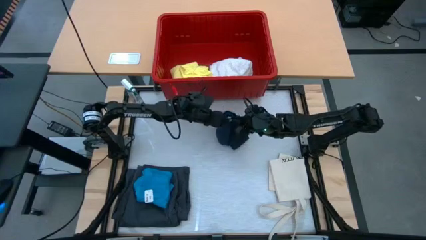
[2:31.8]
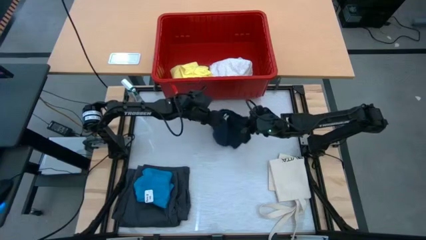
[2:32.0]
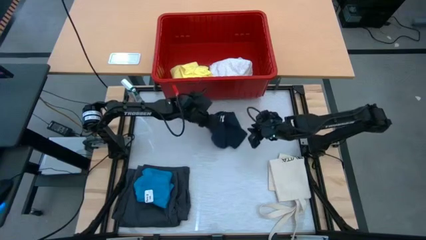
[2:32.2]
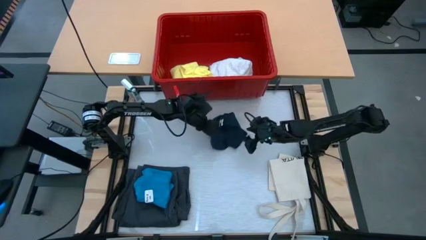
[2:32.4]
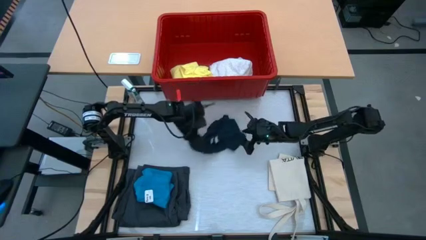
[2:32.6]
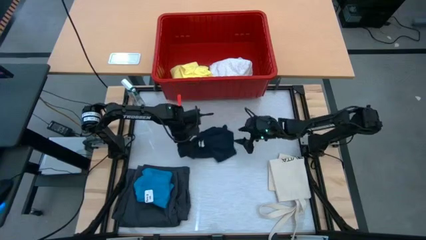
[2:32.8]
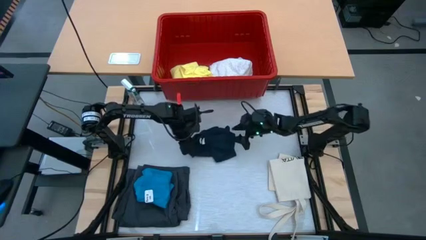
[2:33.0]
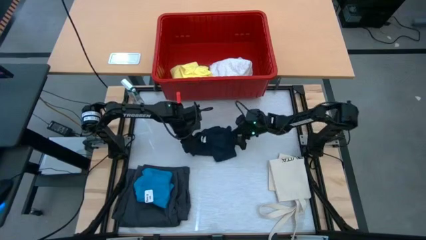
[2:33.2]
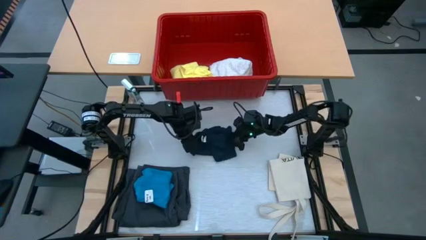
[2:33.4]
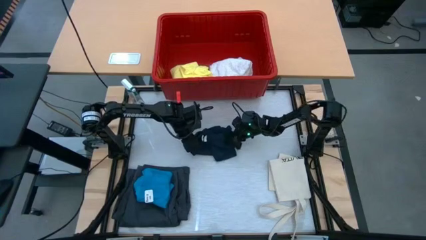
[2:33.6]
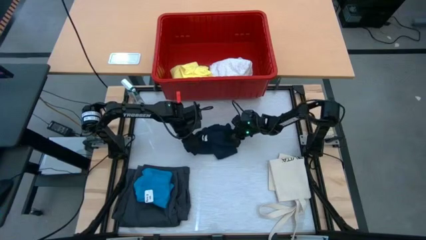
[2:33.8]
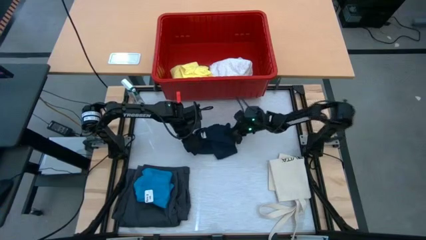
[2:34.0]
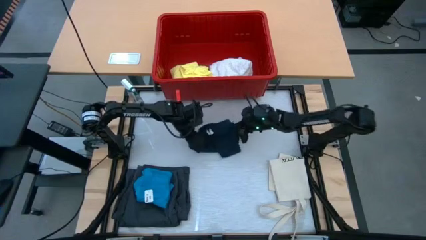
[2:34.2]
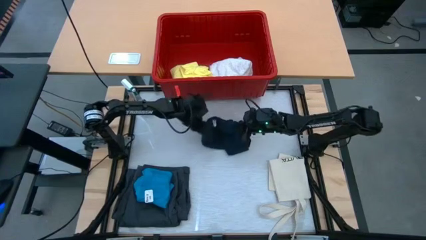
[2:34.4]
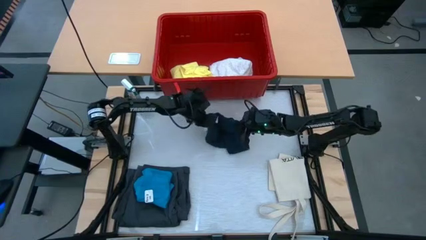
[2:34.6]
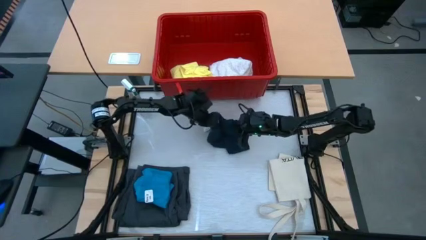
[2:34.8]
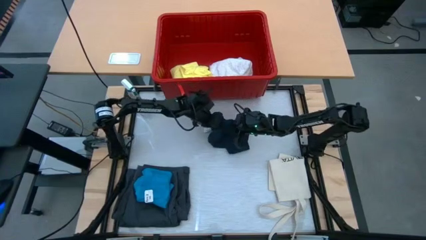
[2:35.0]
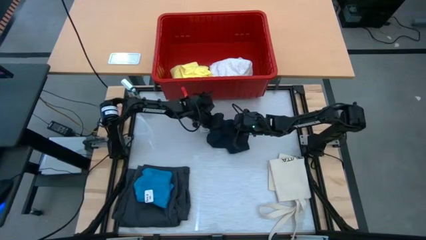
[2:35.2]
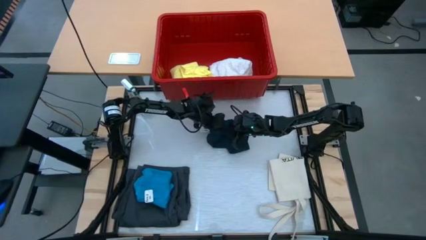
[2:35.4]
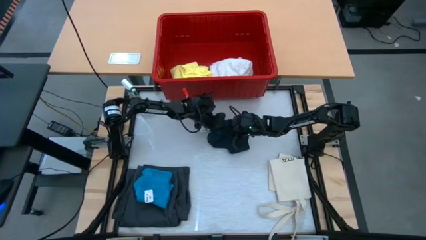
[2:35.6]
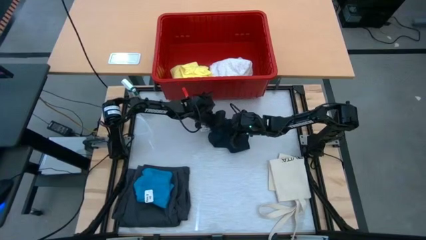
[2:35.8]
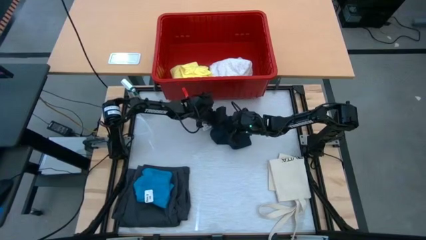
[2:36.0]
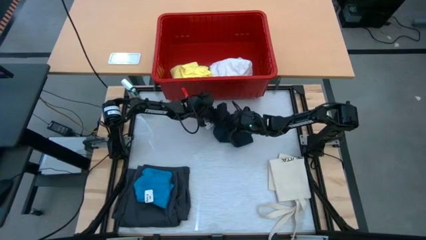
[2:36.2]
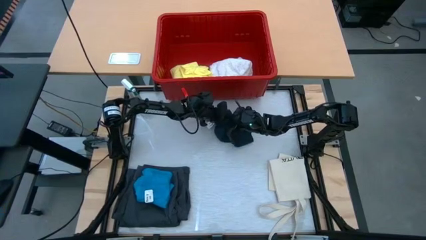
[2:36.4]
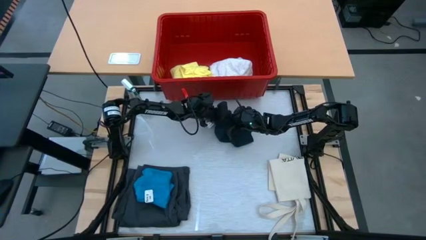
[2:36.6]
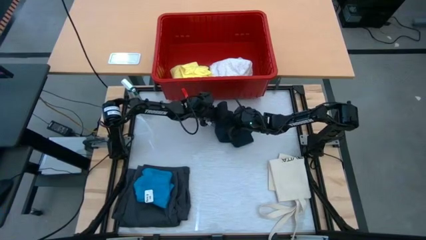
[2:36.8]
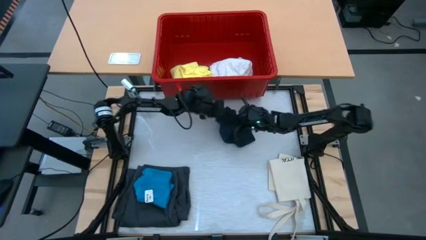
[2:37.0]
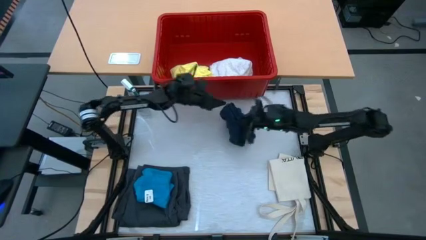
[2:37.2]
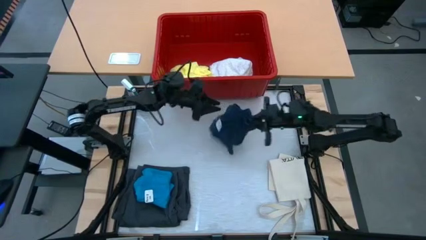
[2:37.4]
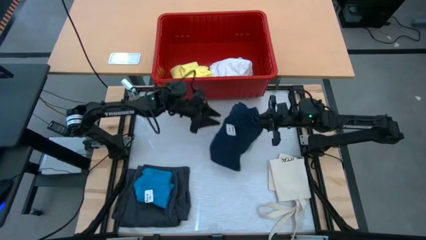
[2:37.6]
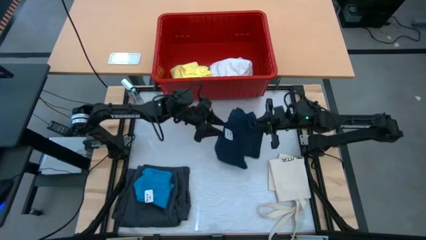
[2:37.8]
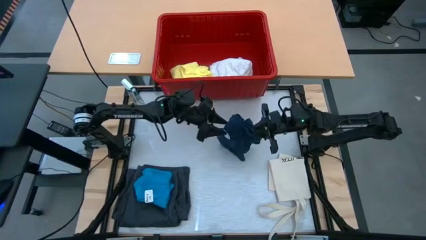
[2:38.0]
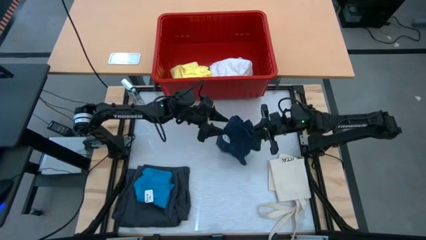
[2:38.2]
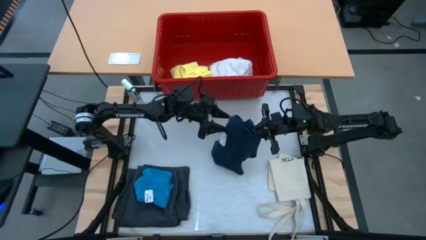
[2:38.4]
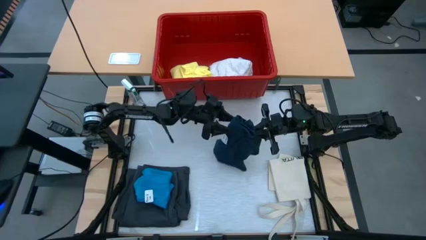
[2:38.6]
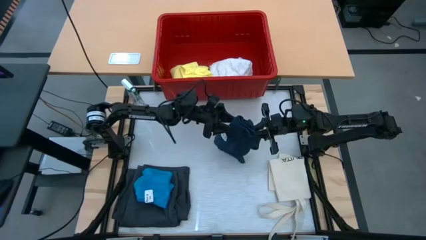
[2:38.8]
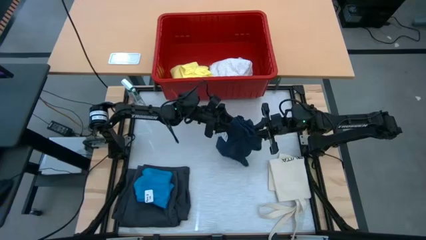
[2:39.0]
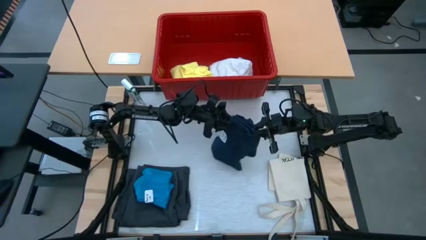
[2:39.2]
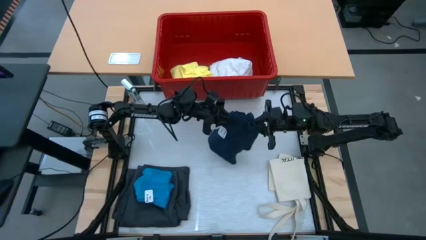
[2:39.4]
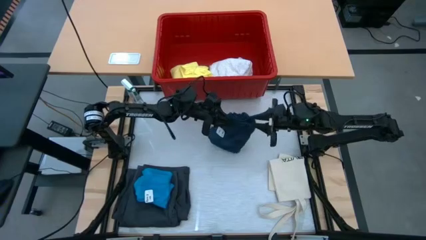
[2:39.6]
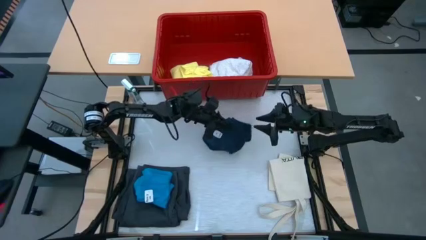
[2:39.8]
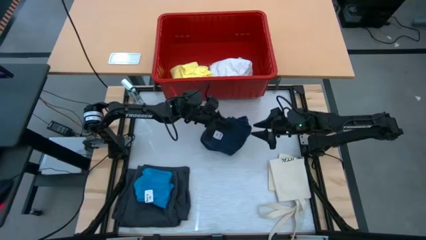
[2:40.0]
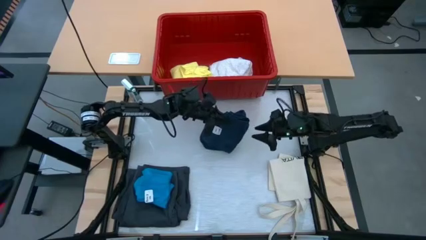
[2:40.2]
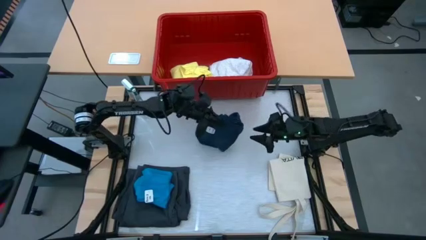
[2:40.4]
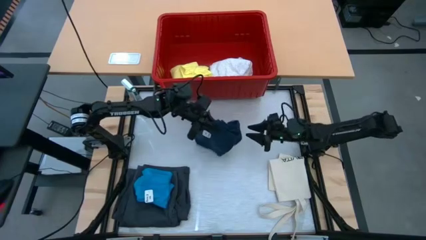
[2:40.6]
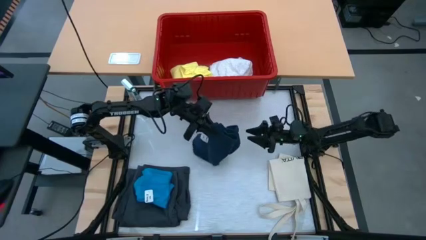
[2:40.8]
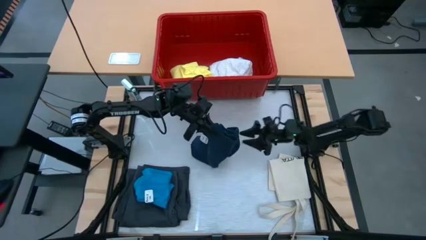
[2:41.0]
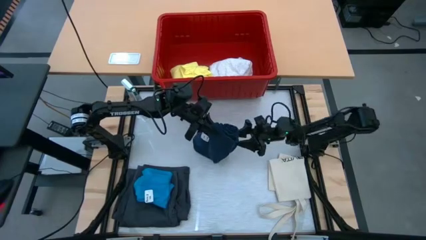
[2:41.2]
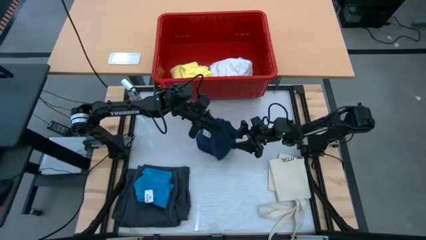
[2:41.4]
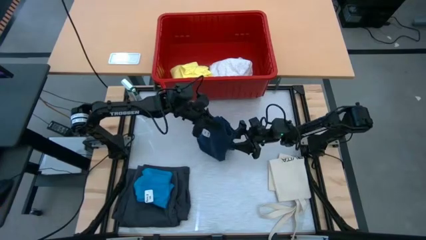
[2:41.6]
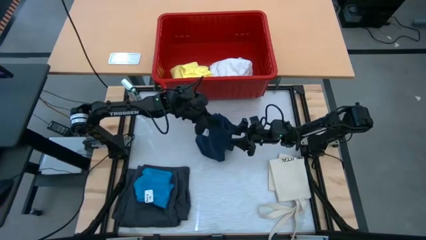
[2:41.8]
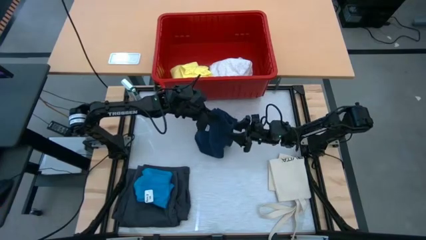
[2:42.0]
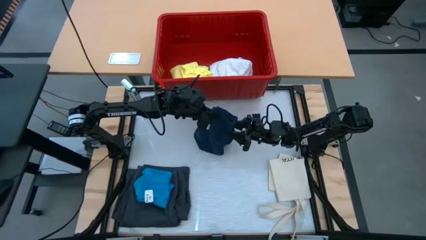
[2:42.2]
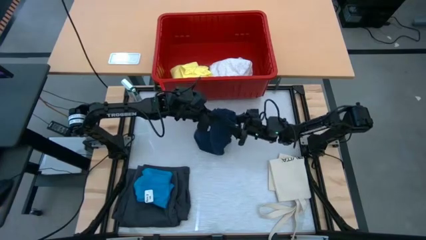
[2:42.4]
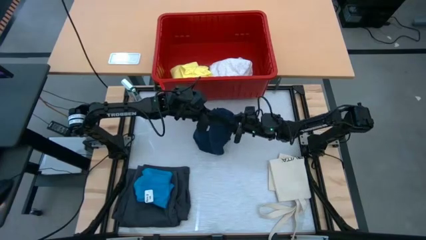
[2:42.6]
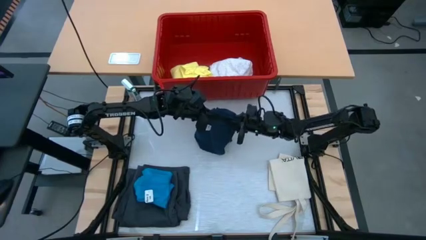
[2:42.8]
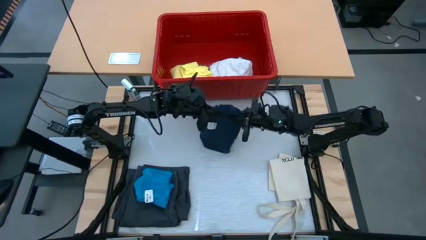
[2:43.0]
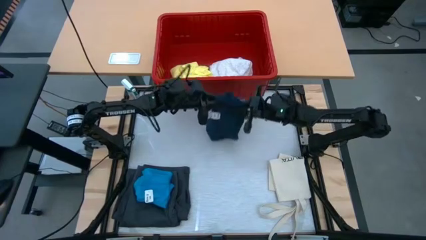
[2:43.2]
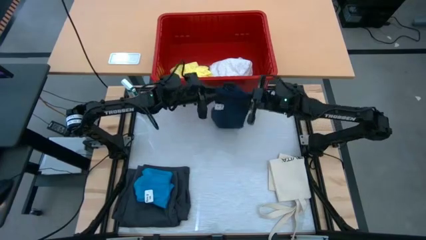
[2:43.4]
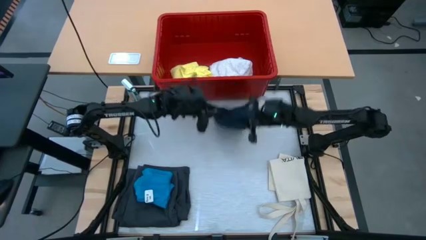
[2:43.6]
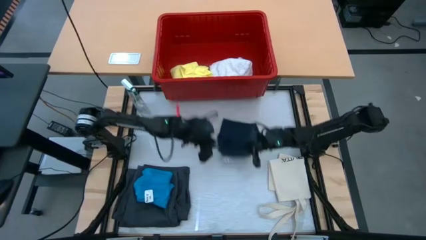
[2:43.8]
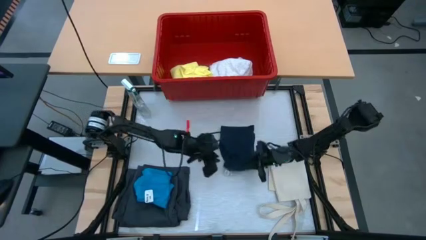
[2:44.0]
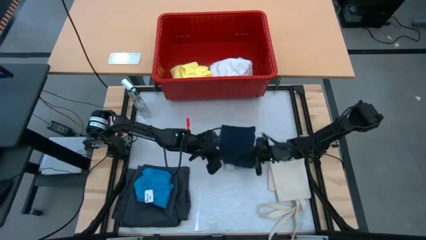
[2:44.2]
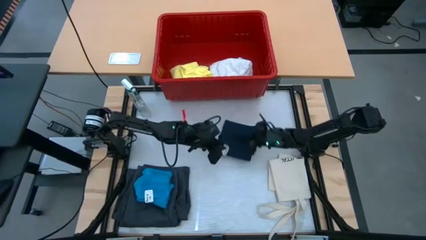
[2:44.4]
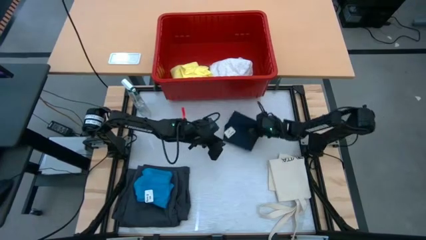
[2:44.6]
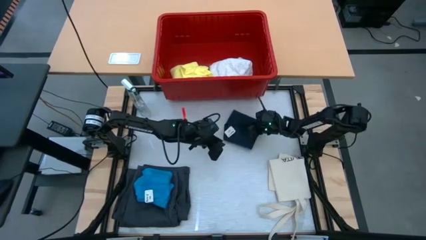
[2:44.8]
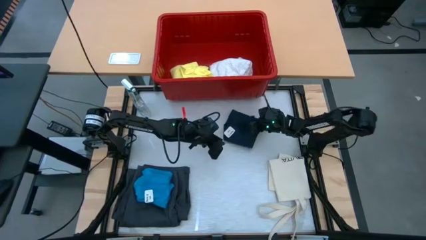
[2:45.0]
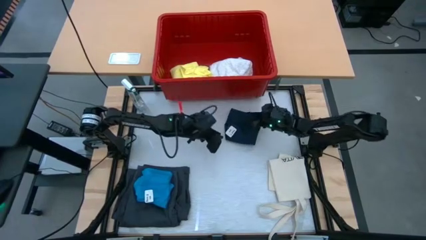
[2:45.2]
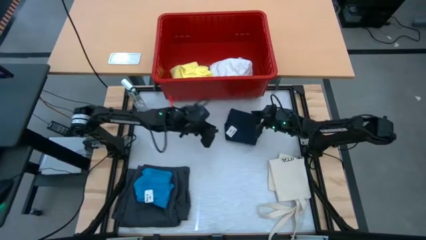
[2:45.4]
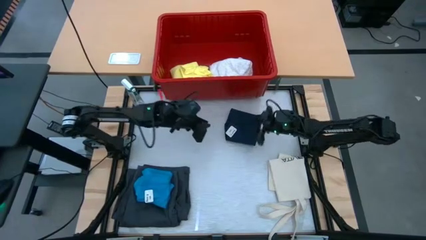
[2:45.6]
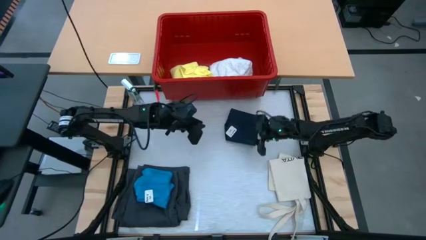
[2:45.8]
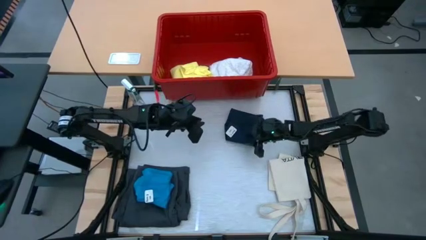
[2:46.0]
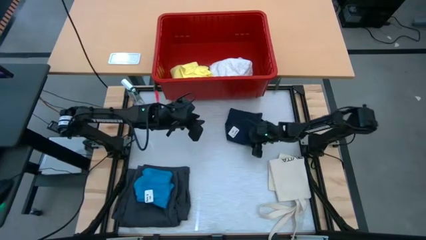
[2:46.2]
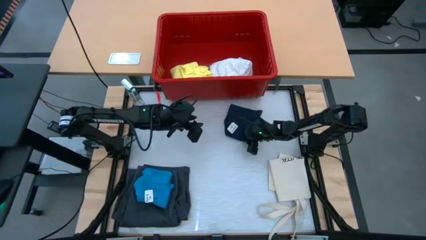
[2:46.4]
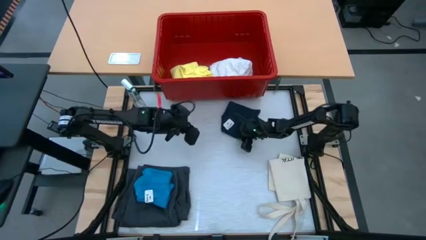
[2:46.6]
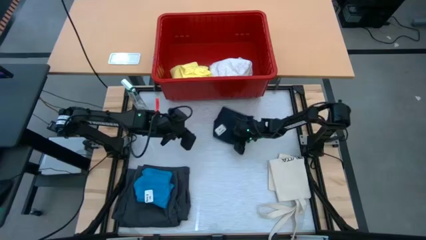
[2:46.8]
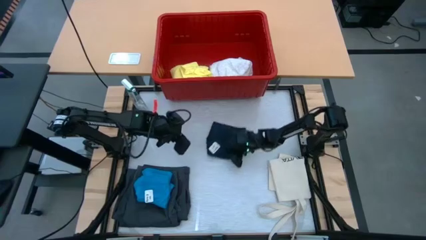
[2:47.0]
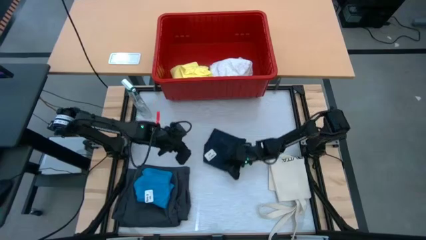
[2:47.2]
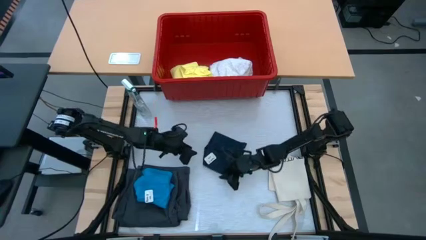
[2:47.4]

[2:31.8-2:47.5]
Task: Fold laundry
Fold the black shorts
